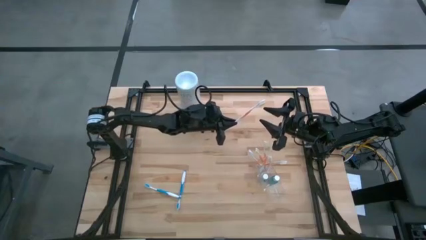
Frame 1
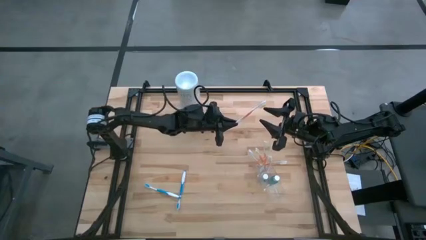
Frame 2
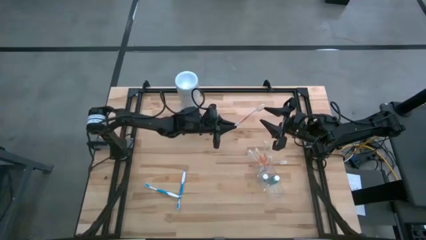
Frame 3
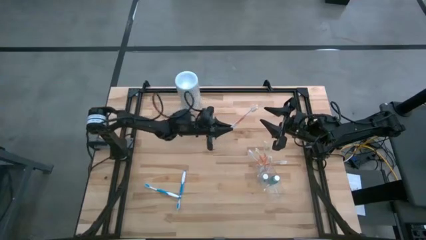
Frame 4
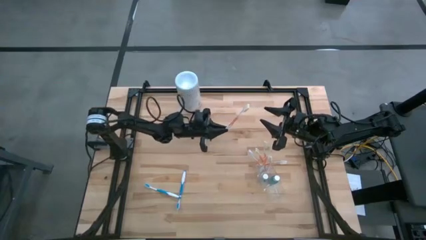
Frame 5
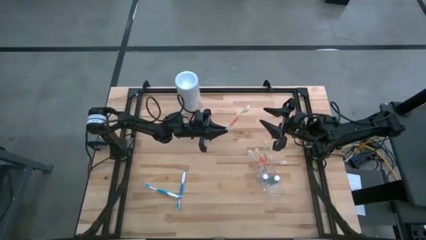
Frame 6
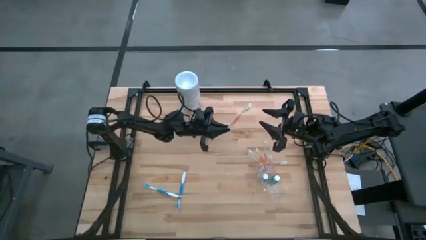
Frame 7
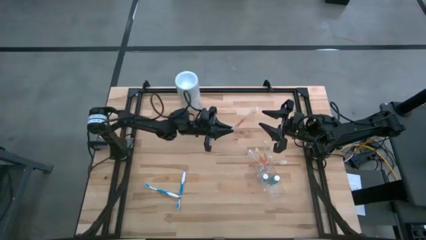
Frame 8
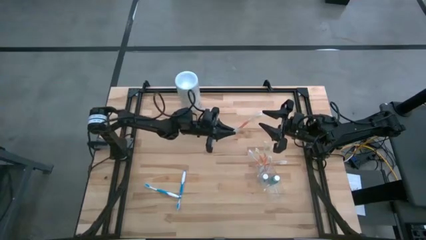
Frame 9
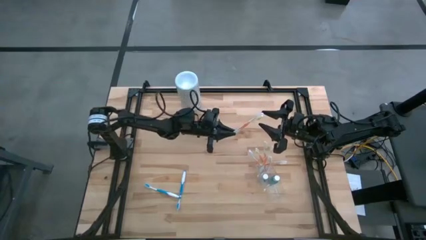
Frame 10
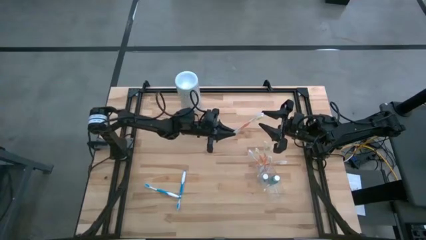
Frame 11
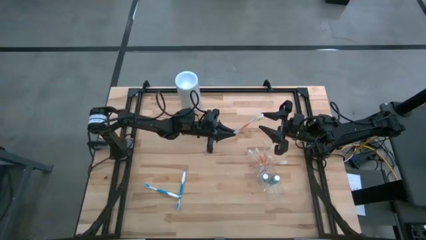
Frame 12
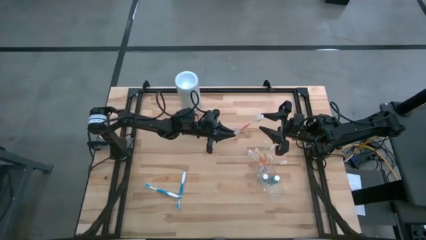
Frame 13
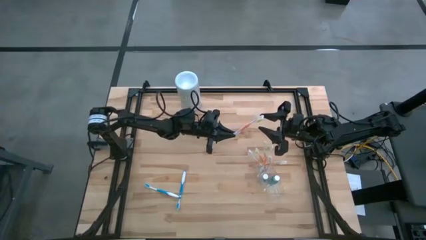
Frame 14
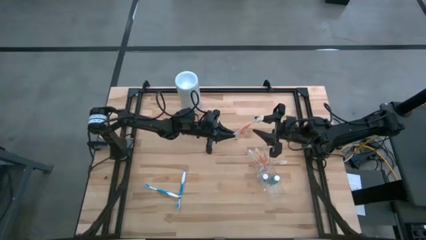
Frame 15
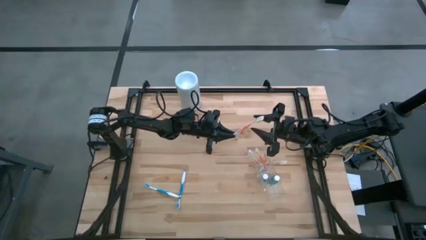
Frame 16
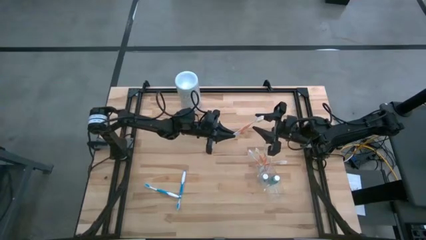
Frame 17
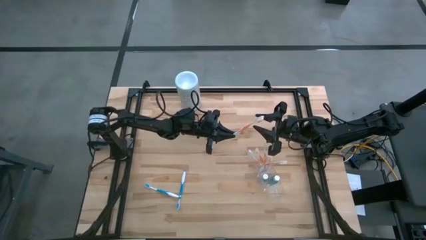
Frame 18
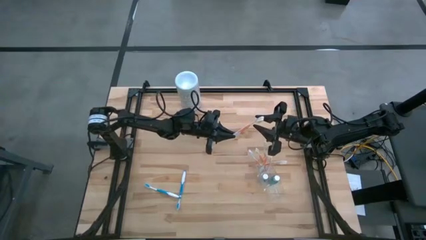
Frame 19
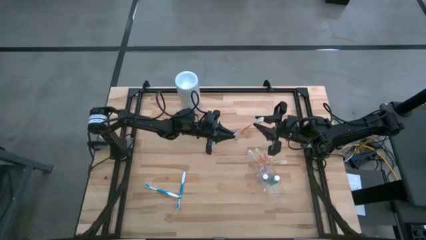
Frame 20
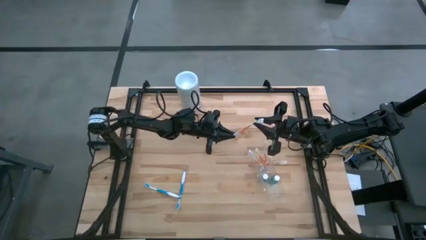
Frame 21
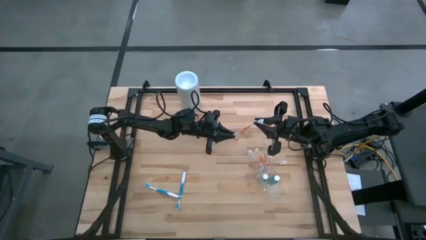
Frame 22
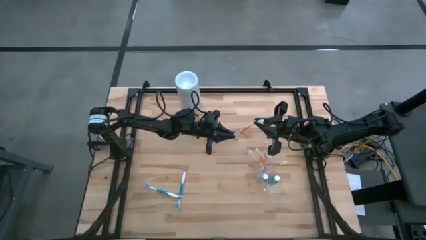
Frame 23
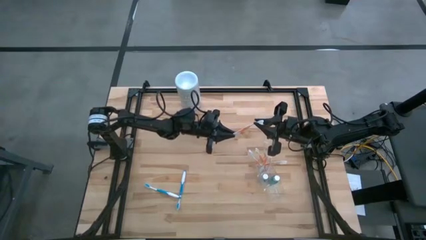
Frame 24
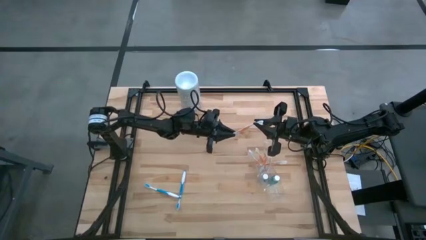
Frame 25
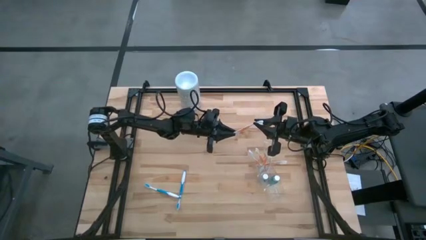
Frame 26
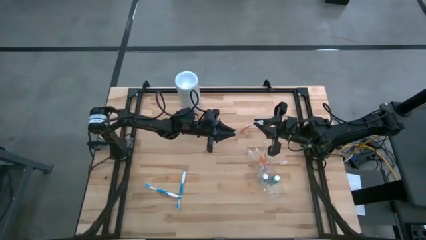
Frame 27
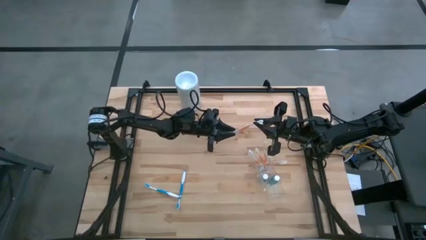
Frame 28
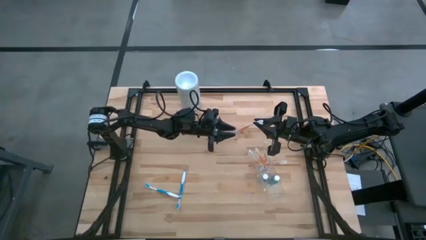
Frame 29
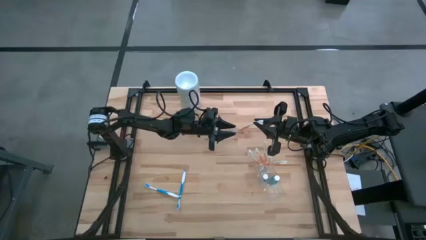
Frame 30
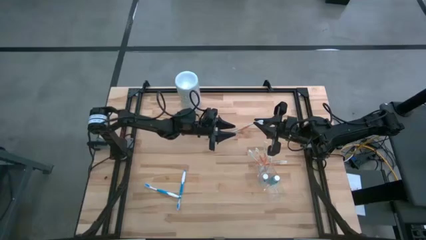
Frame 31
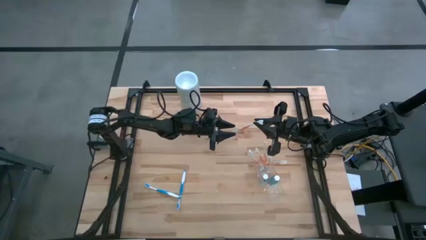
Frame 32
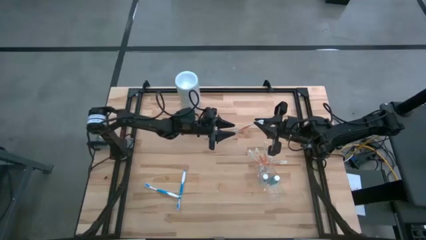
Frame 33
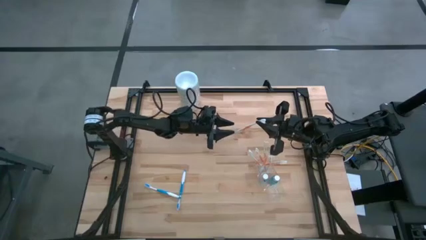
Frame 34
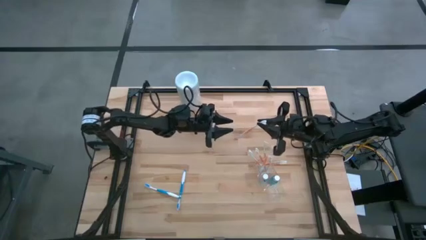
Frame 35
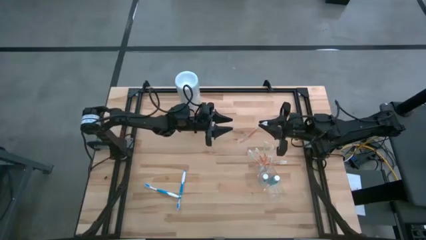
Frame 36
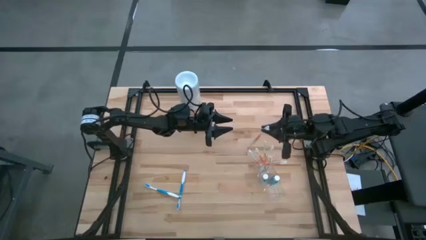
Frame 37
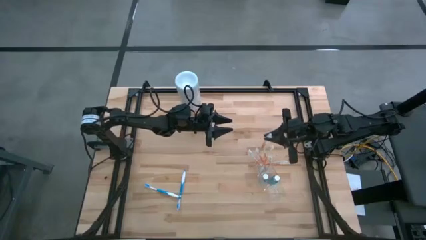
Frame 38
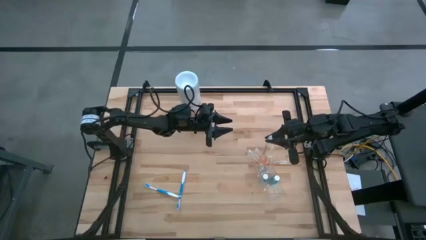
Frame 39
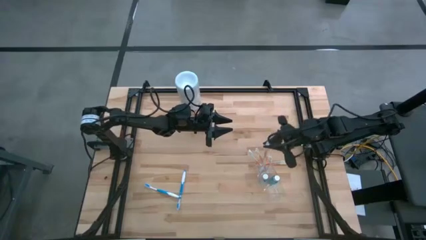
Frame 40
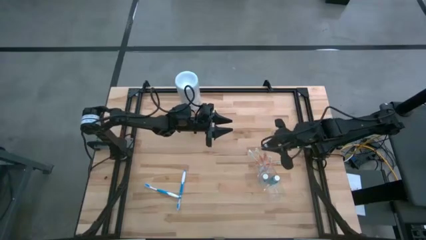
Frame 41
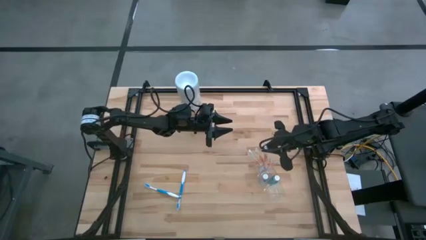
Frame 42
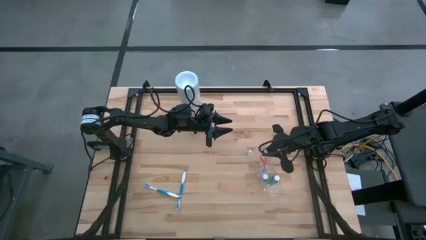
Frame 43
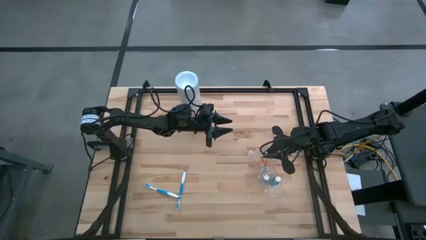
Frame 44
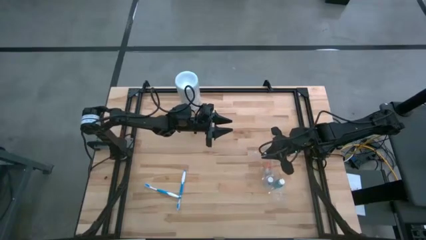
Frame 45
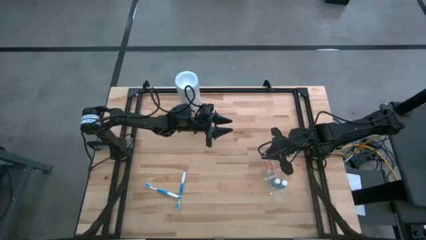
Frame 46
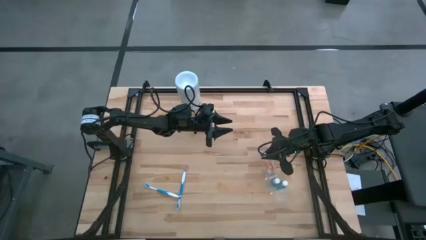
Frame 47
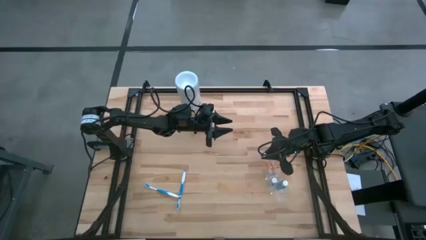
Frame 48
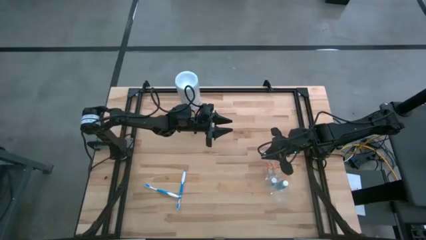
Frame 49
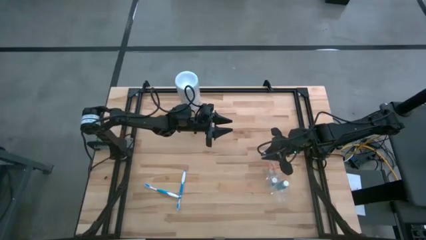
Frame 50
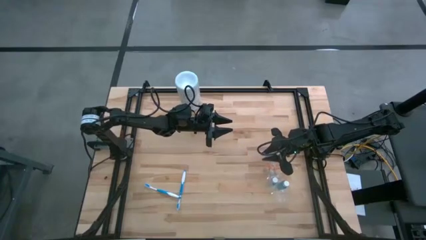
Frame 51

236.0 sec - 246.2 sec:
Task: Pick & Place toothbrushing station
Put the orange toothbrush into the top section of the transparent organizer

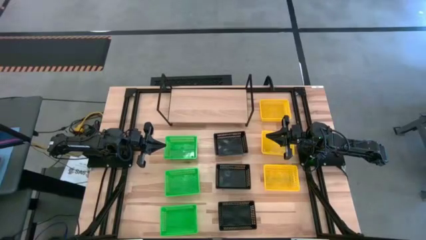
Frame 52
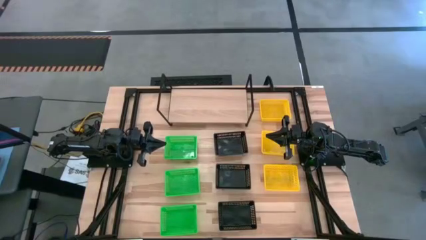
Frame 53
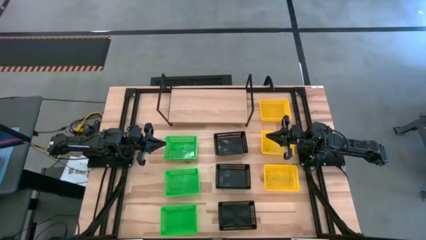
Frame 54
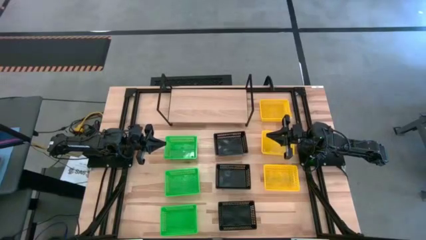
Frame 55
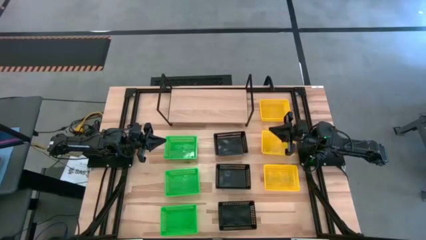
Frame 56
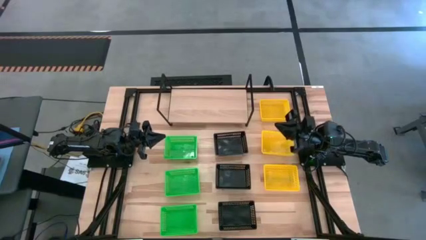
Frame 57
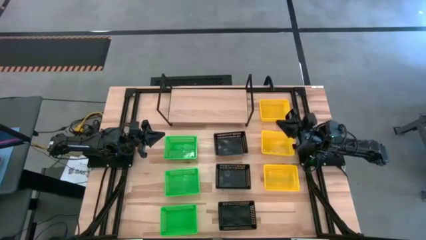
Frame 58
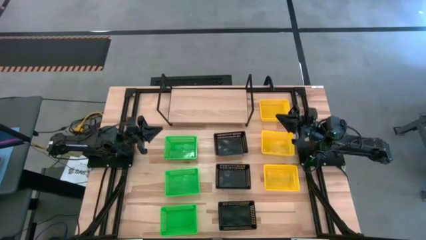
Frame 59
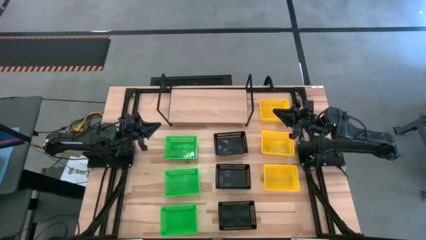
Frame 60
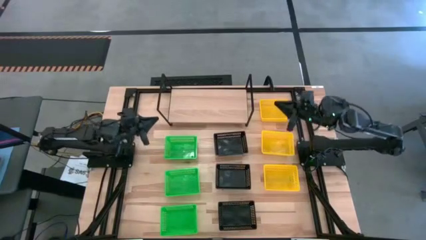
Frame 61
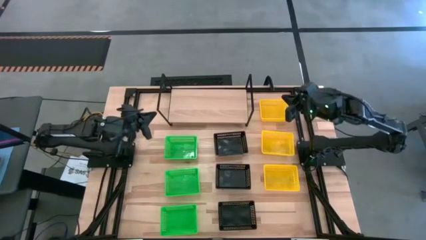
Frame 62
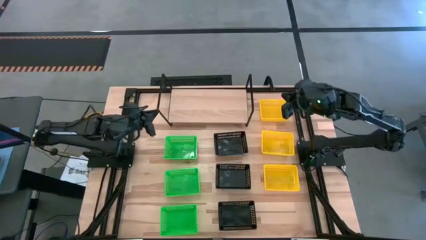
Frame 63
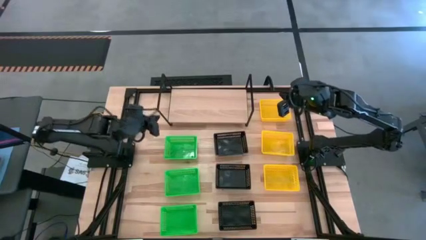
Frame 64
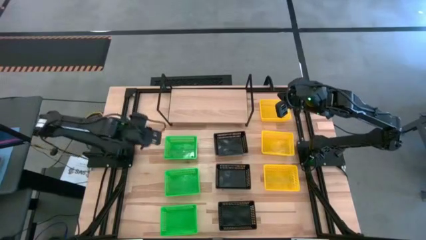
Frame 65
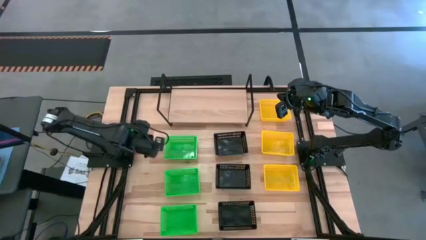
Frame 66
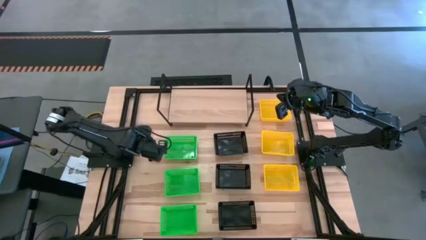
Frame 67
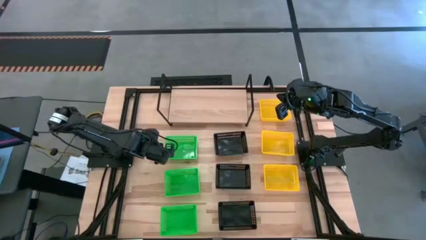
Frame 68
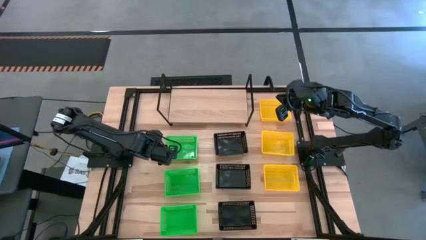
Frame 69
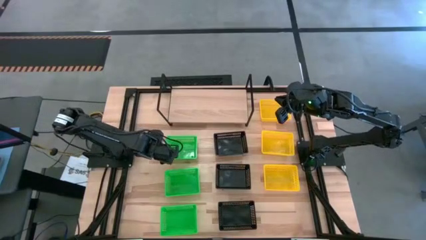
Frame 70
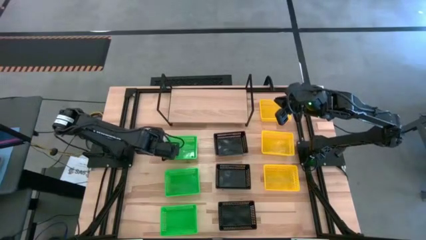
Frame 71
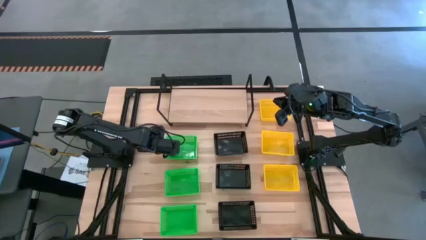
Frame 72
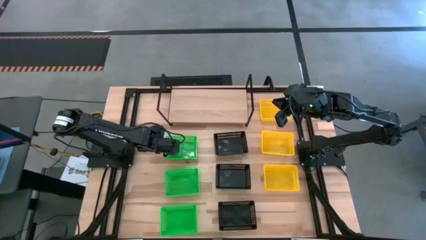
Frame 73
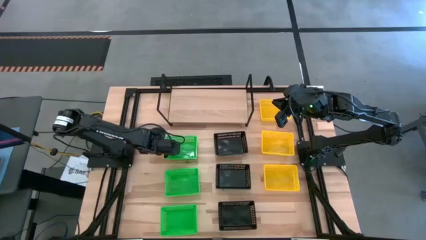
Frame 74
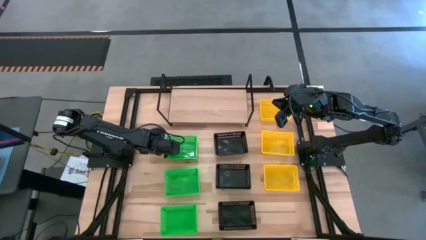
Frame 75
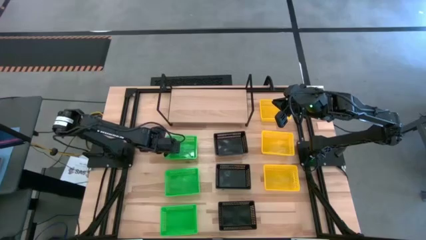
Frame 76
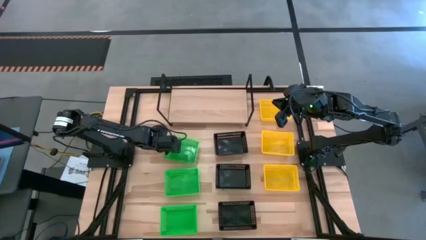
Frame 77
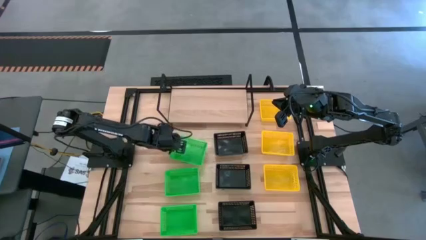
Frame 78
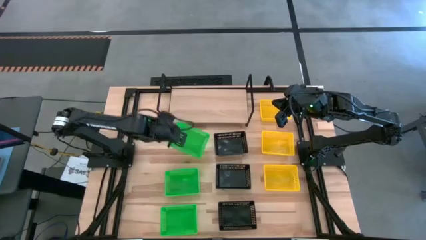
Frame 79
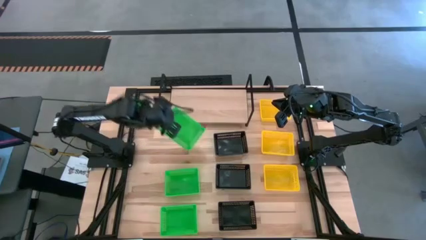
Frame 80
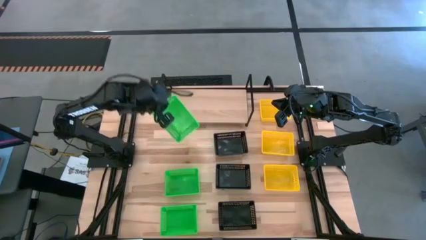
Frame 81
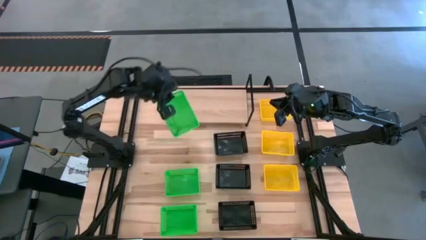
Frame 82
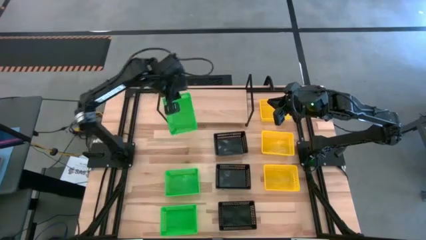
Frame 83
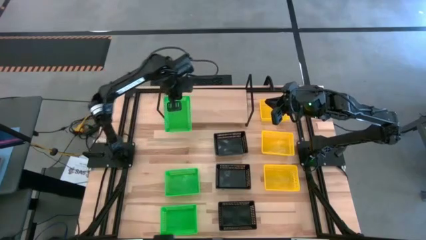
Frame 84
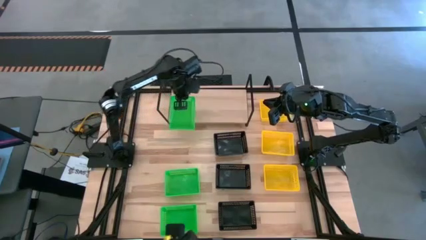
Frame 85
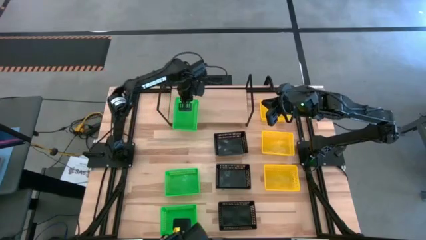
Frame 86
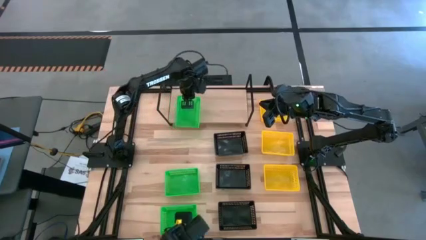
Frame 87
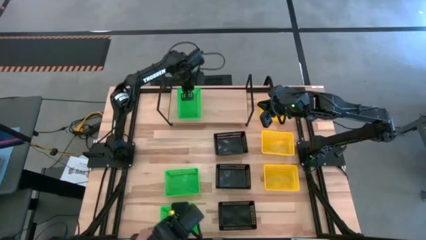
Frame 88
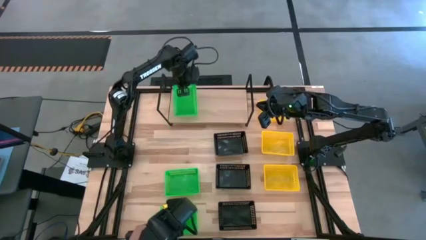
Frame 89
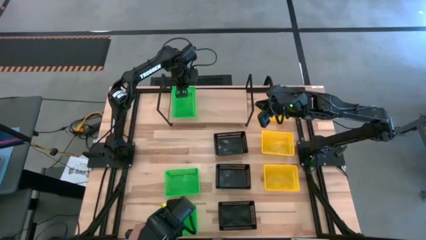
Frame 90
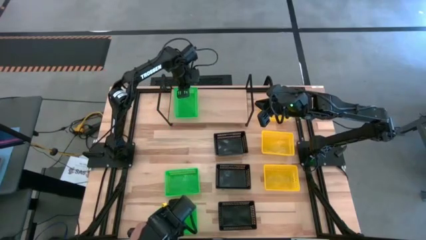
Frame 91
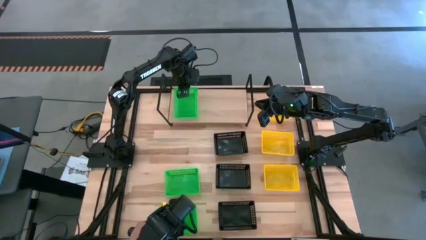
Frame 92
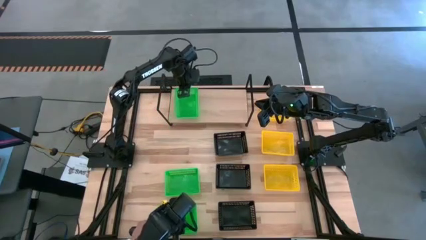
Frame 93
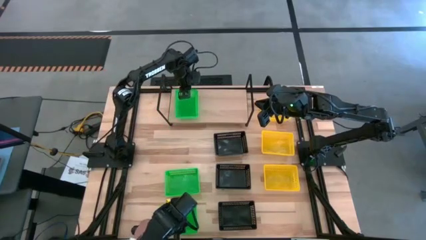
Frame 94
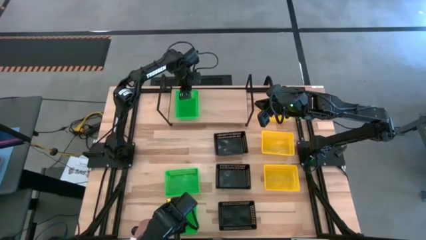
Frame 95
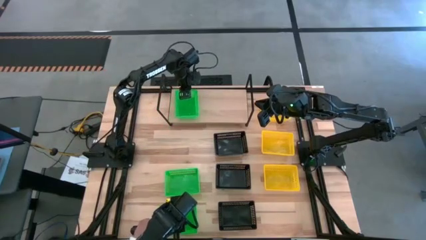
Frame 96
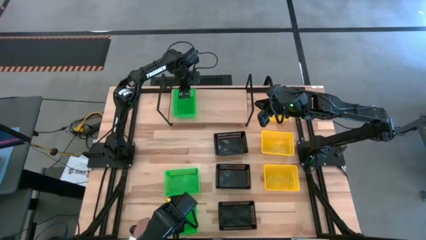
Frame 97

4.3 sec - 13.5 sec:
Task: Stack baskets on shelf by color
Put the top green basket on the shelf
